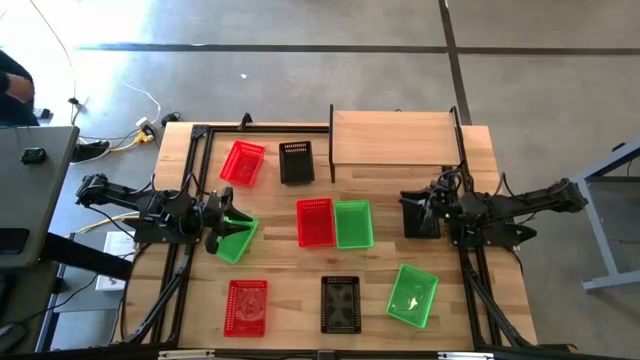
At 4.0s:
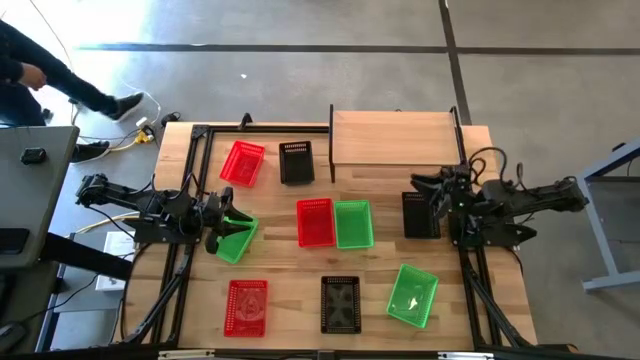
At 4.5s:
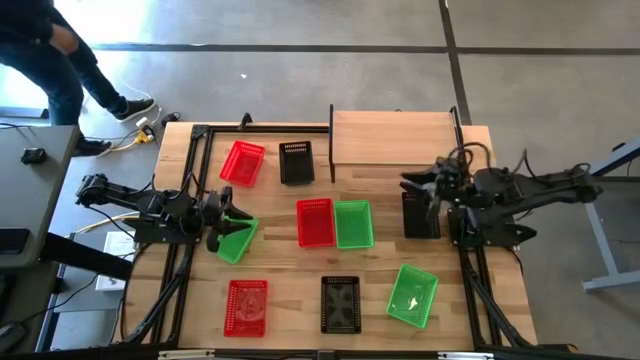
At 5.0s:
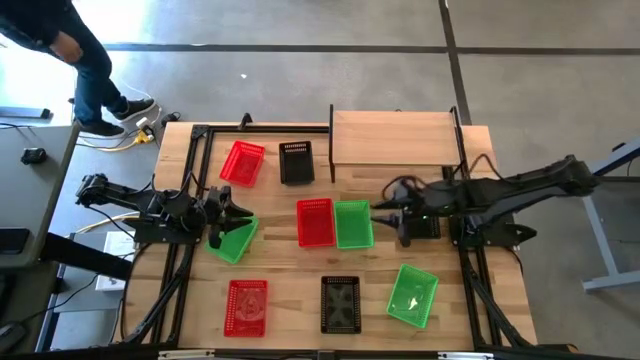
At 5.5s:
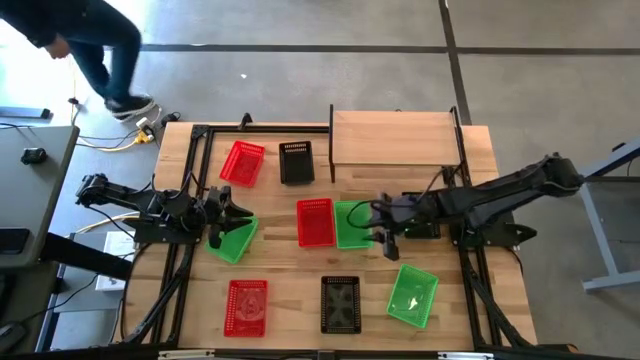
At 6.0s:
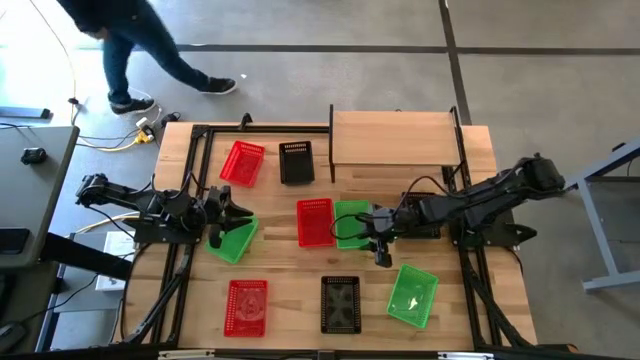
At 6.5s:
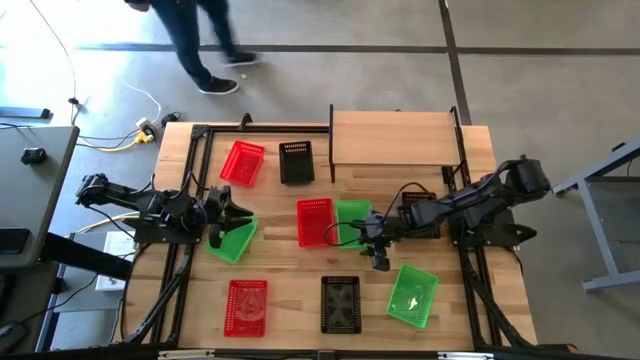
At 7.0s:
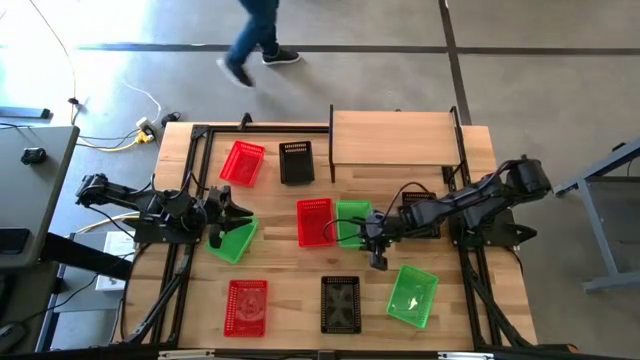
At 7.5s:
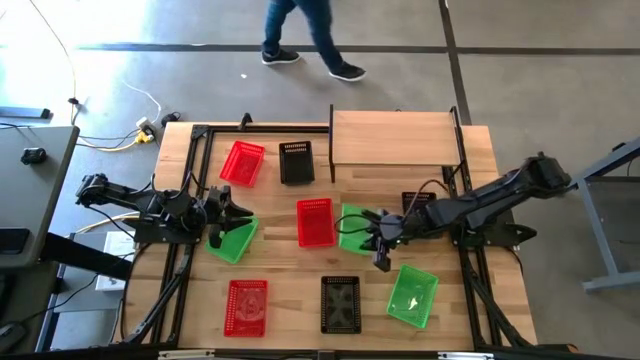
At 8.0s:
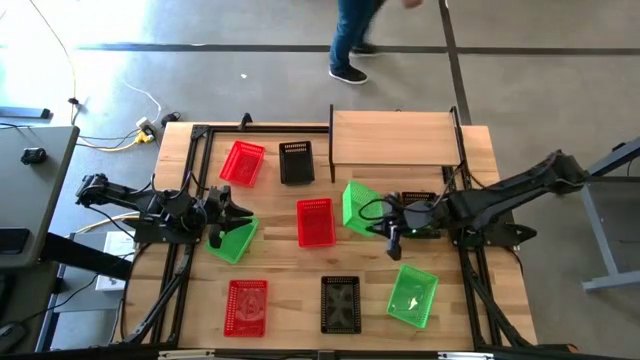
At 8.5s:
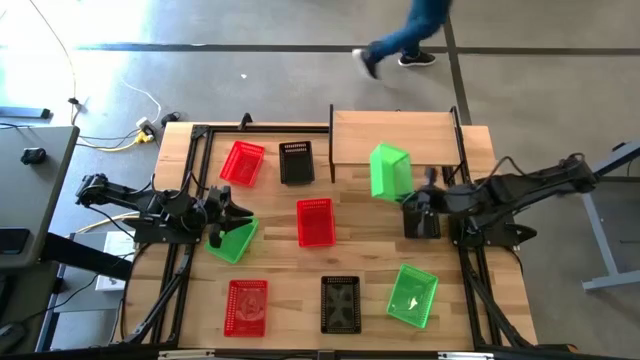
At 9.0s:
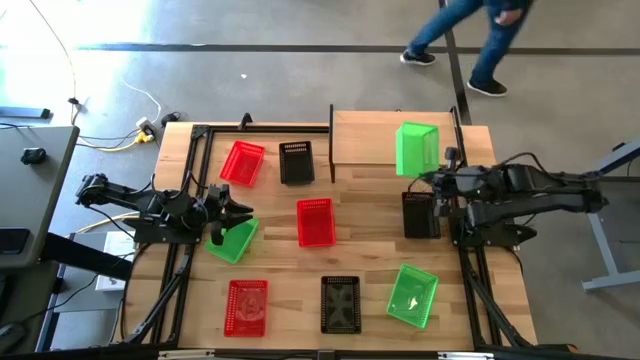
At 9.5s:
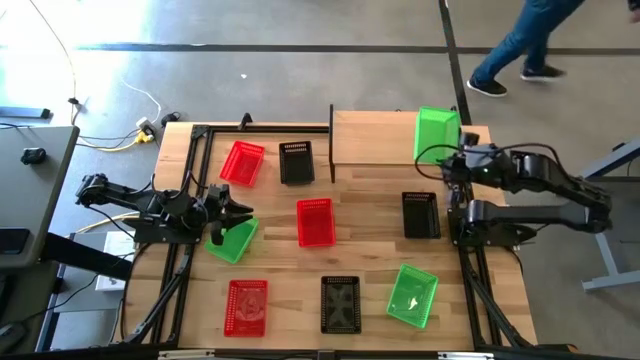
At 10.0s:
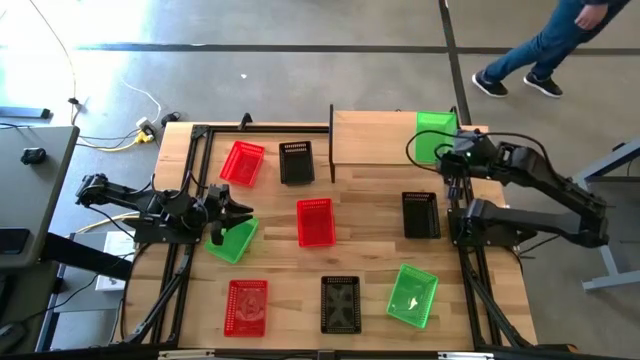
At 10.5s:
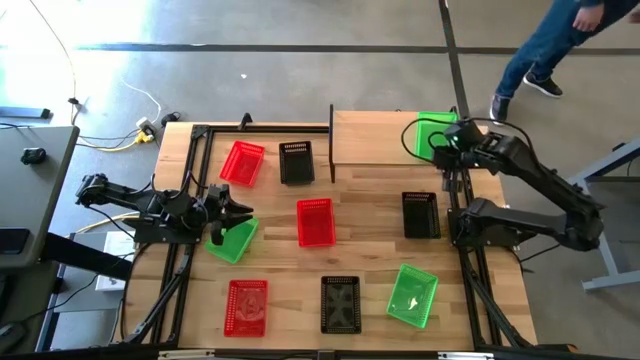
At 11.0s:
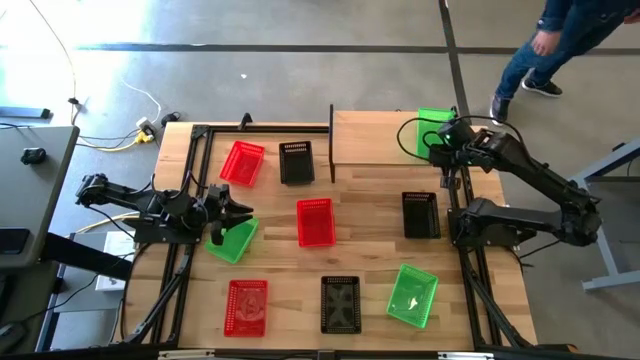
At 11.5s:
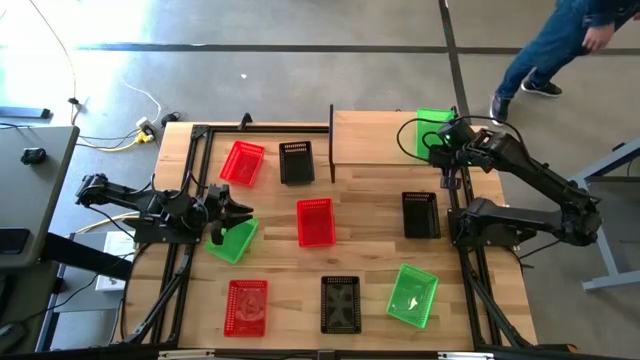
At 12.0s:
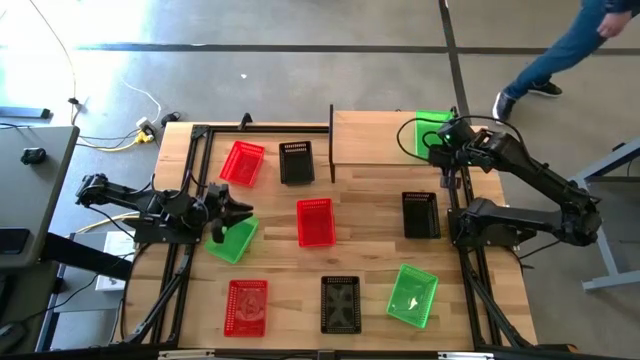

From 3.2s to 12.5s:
Task: Stack baskets on shelf by color
Put the top right green bin on the shelf

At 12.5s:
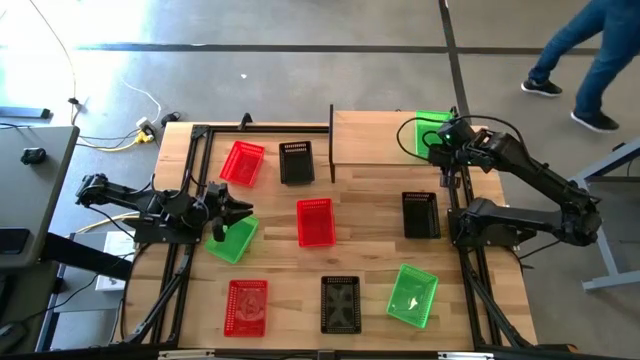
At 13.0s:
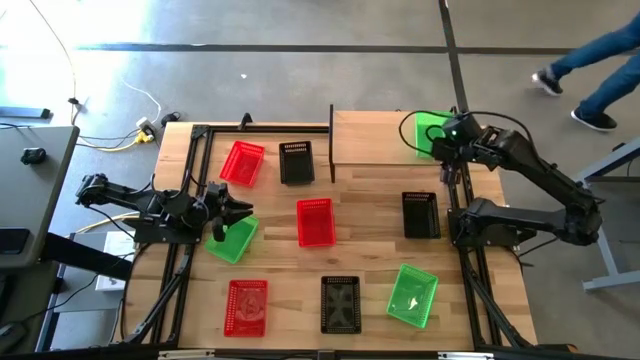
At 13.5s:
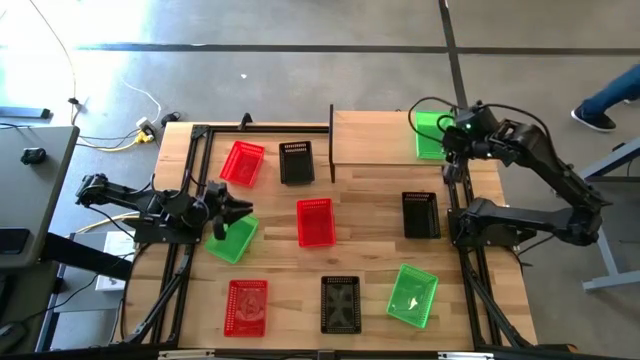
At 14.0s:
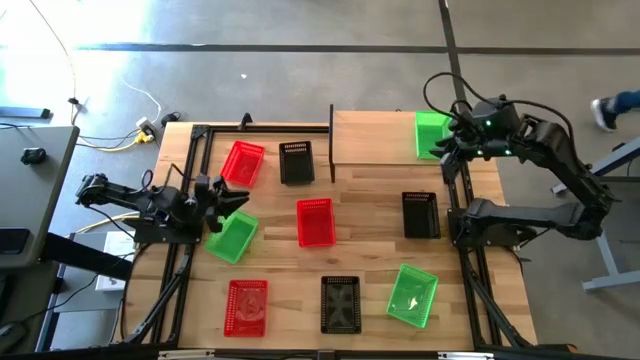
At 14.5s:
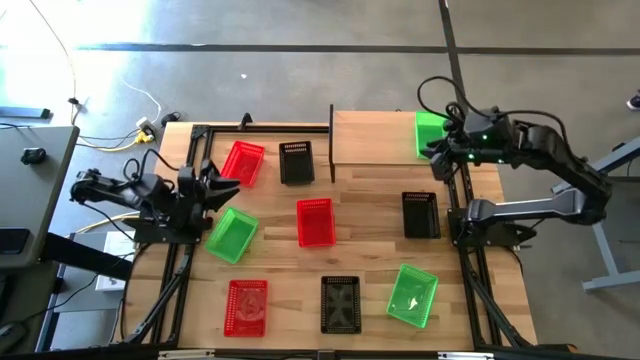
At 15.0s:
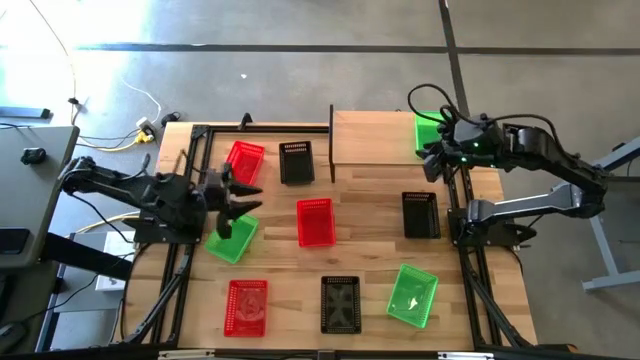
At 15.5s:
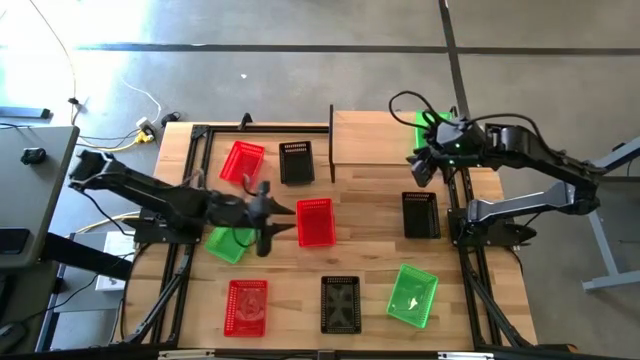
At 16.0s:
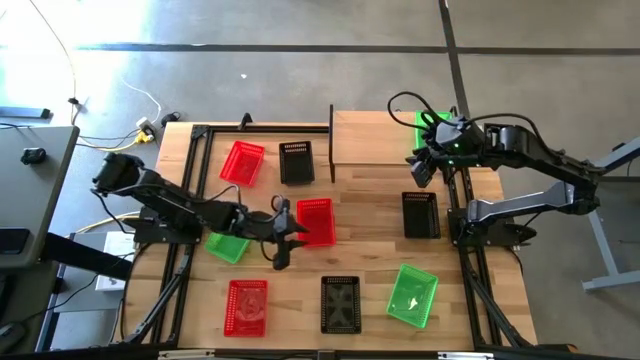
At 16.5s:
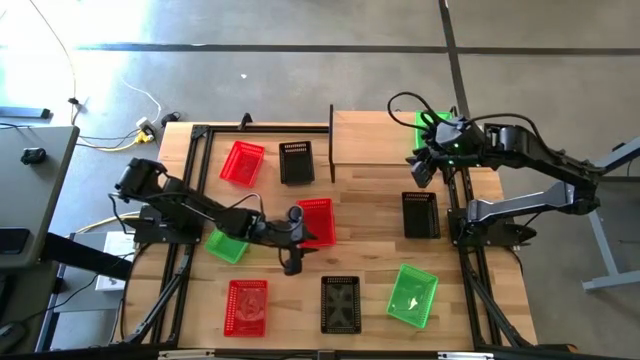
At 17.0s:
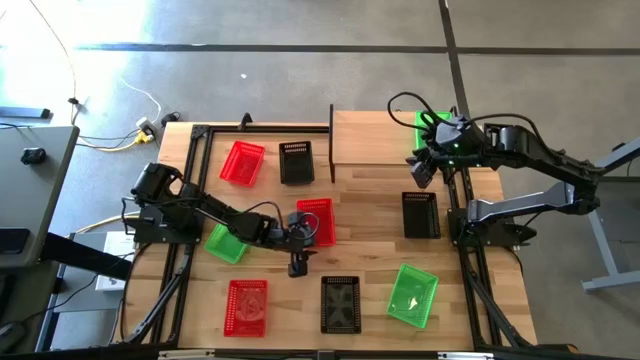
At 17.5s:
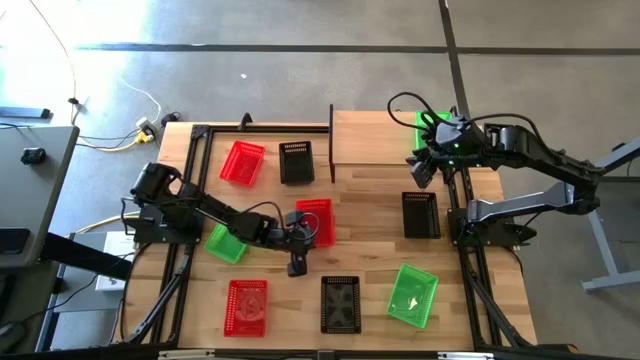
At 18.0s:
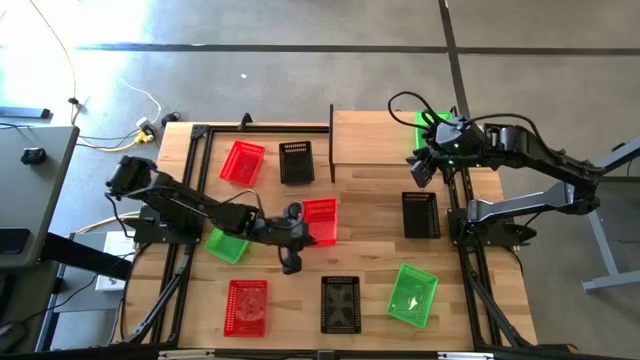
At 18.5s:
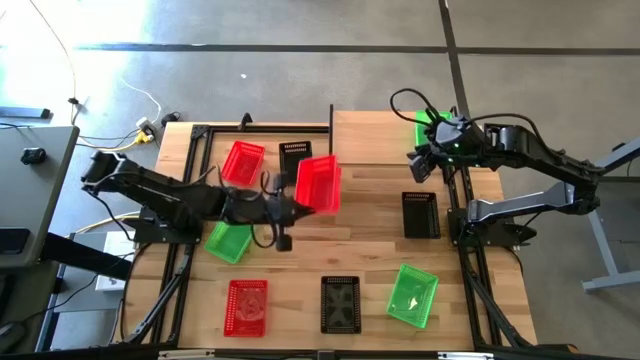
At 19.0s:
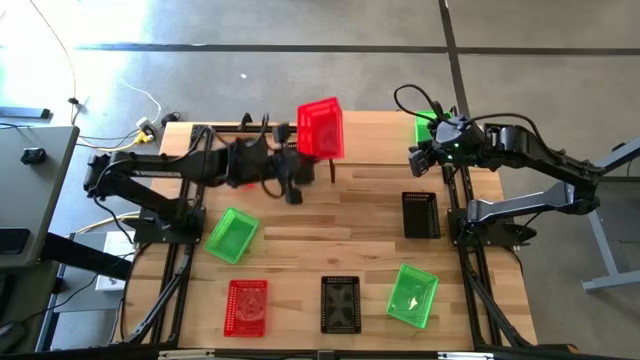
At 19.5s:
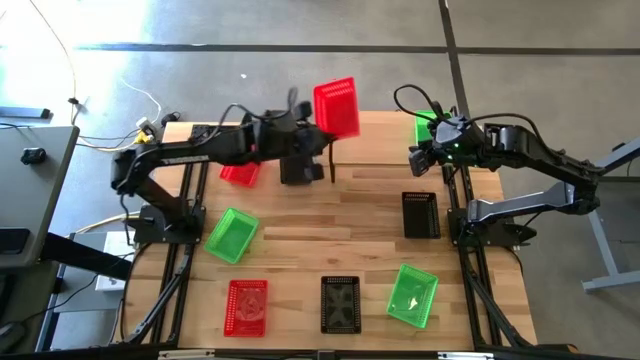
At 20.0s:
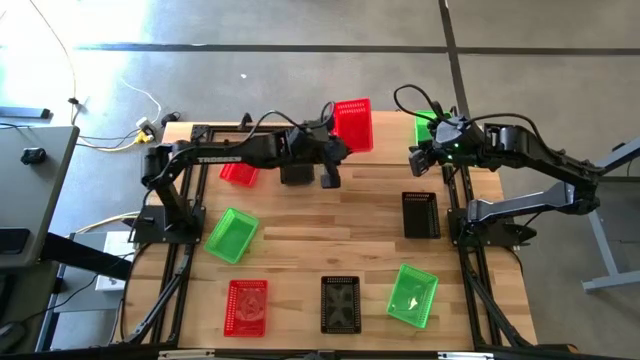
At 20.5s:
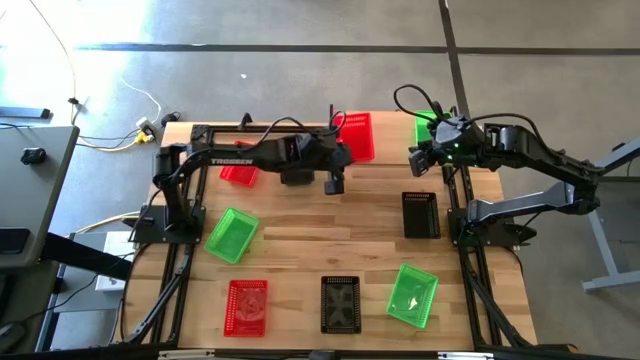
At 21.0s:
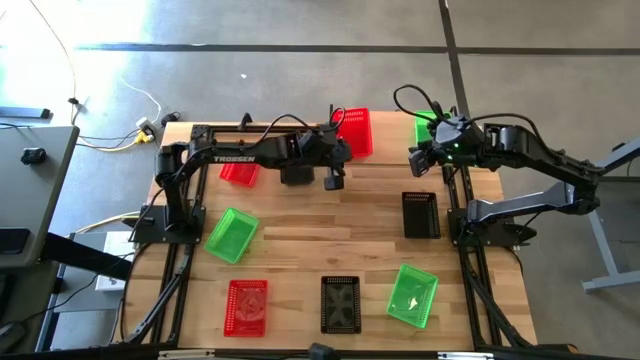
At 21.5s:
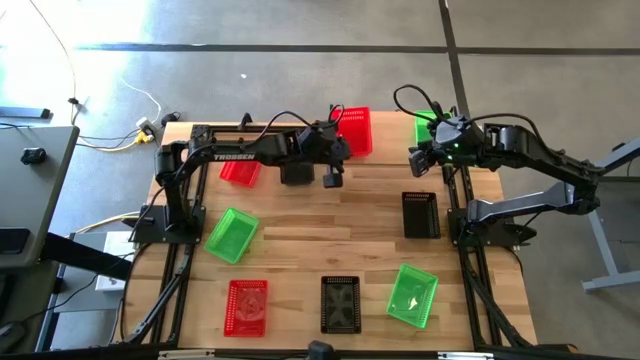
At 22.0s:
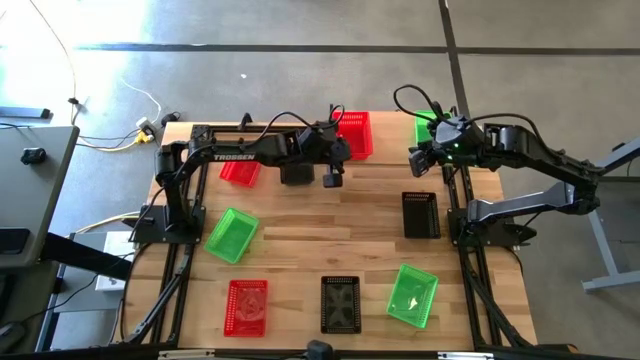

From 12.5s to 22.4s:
Put the middle red bin on the shelf

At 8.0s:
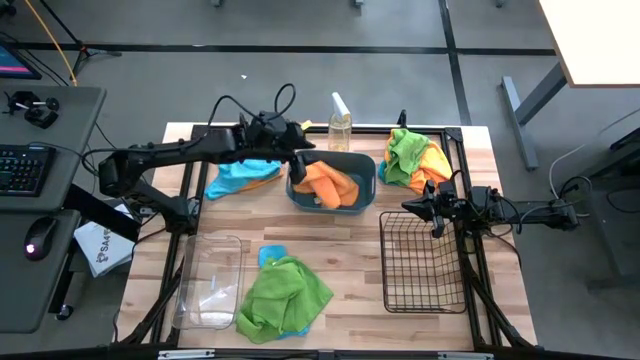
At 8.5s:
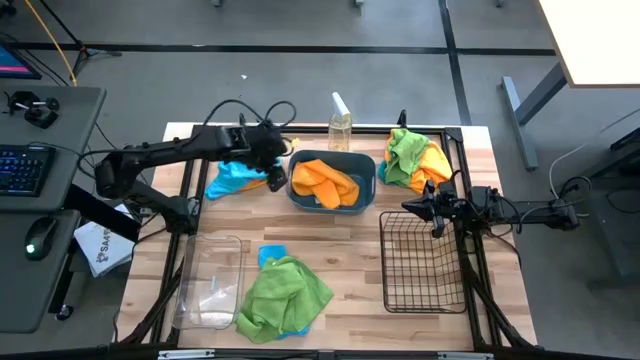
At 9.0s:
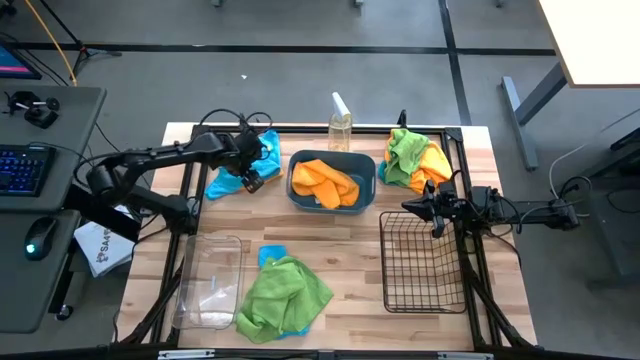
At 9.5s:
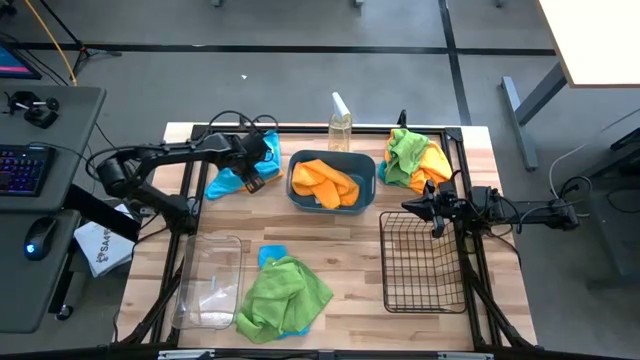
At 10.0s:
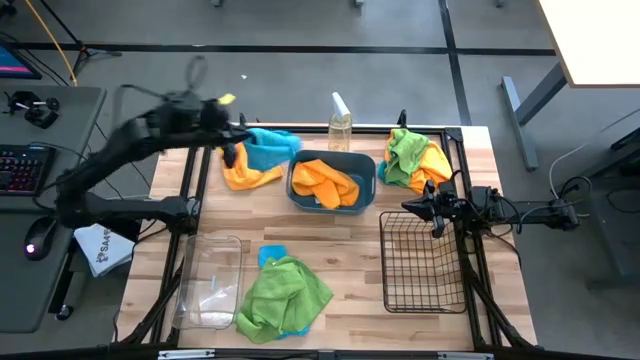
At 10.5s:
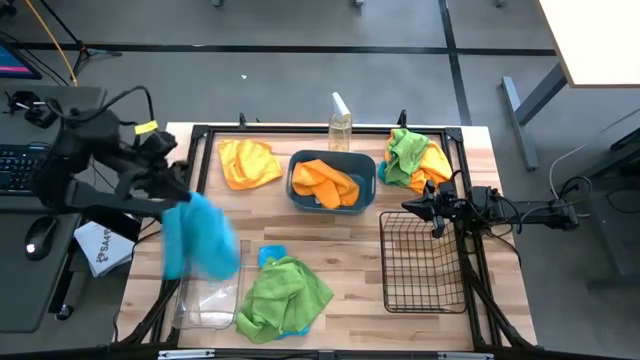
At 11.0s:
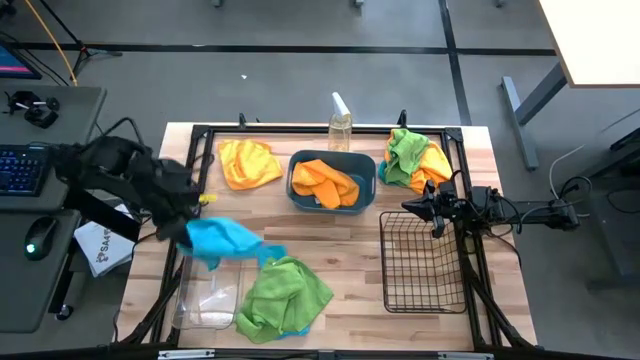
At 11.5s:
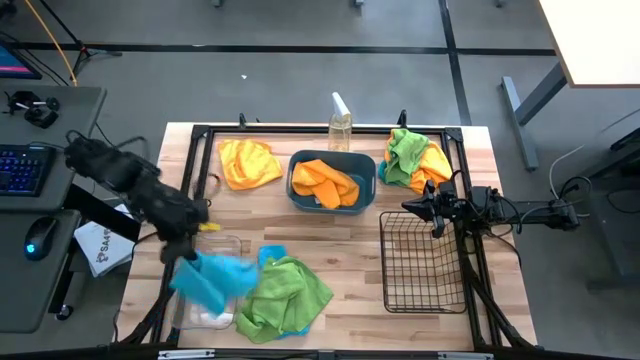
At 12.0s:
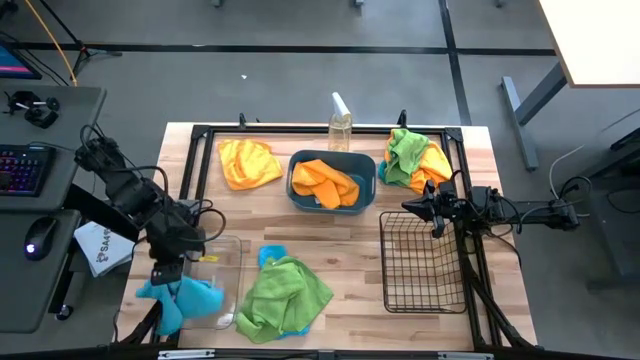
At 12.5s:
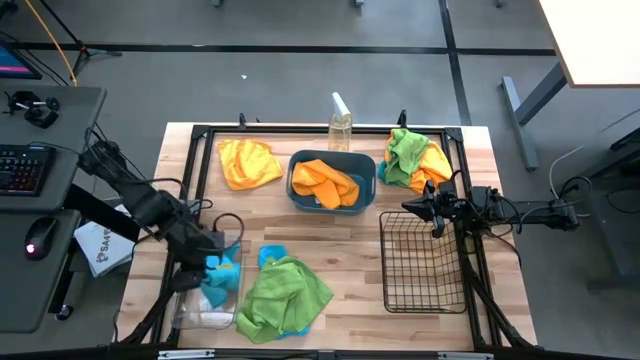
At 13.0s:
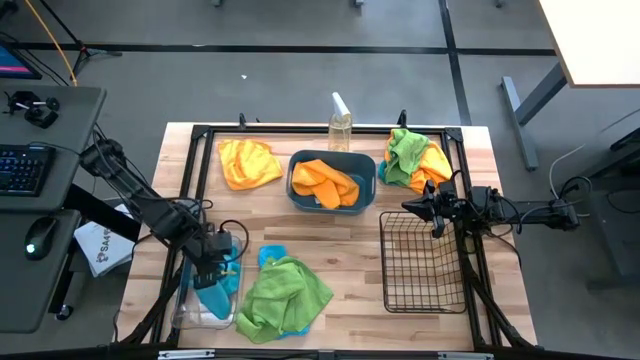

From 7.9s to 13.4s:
Task: Sort microfiber towel by color & place in baskets
Put the top left blue towel into the transparent bin
